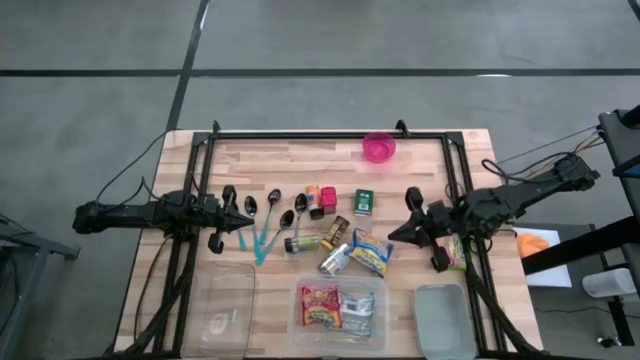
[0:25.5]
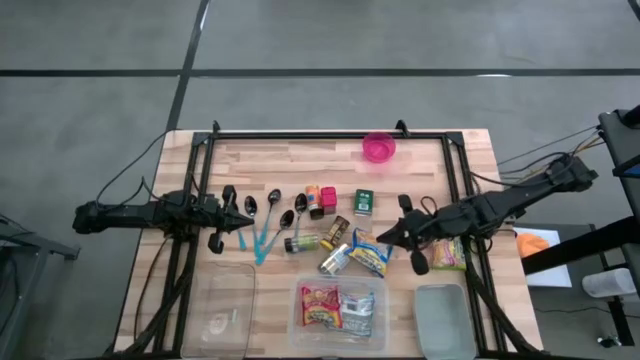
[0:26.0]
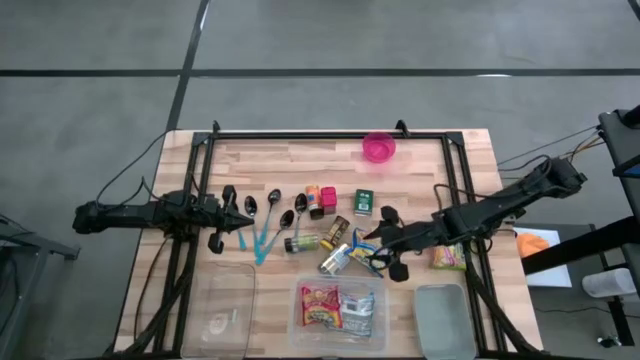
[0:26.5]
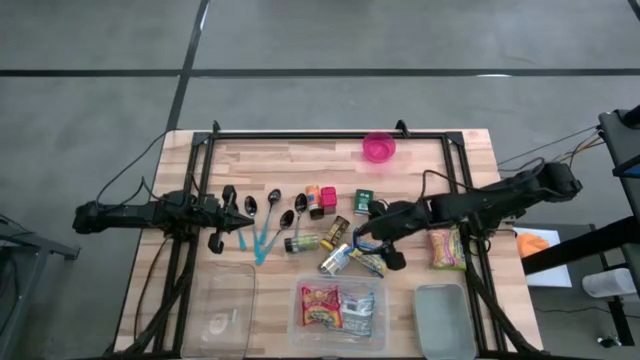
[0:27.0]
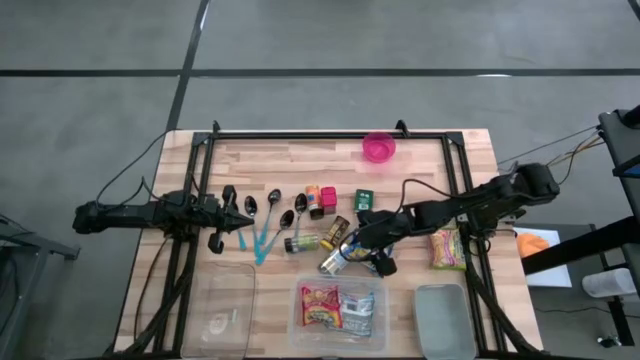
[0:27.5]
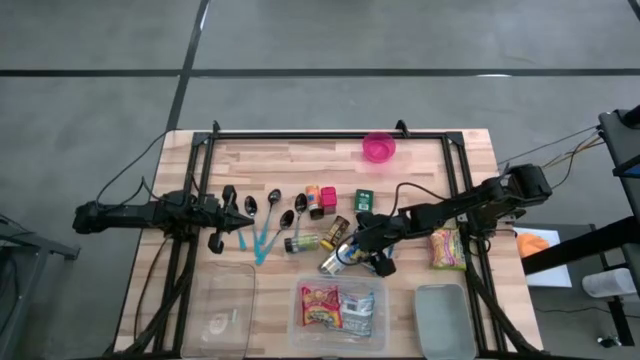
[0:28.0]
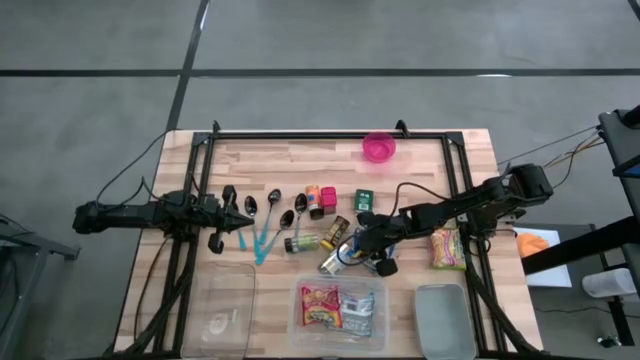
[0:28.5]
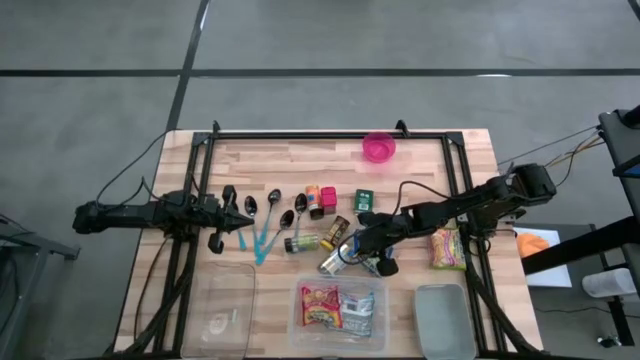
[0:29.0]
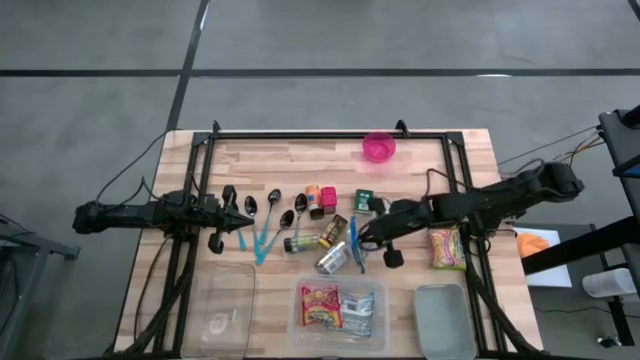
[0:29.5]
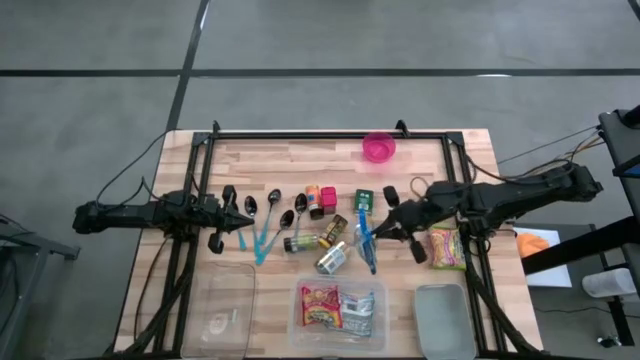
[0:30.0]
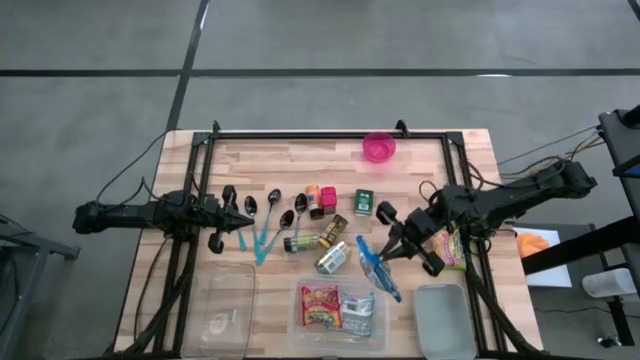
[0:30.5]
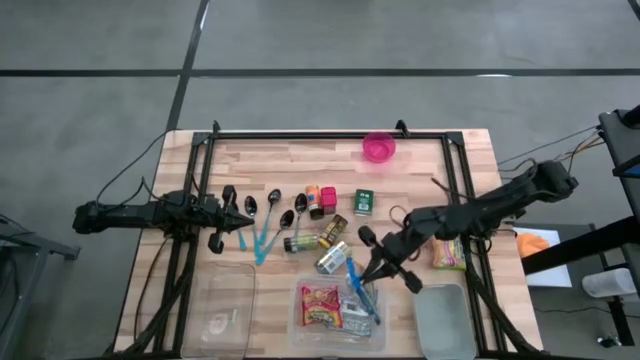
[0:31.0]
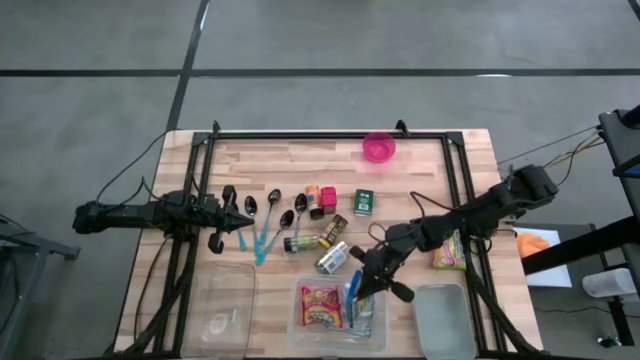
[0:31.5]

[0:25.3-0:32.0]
Put the blue noodle pack into the white bin

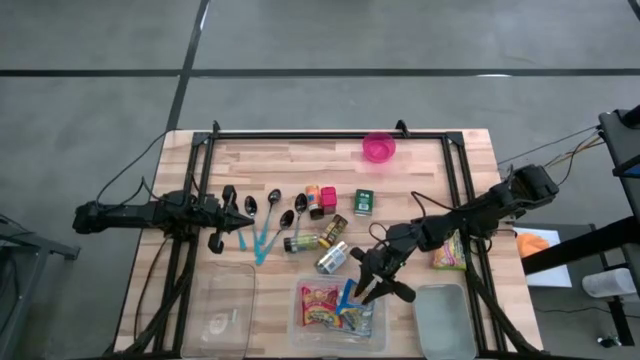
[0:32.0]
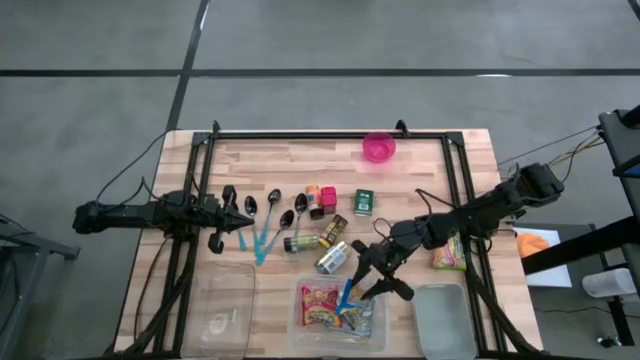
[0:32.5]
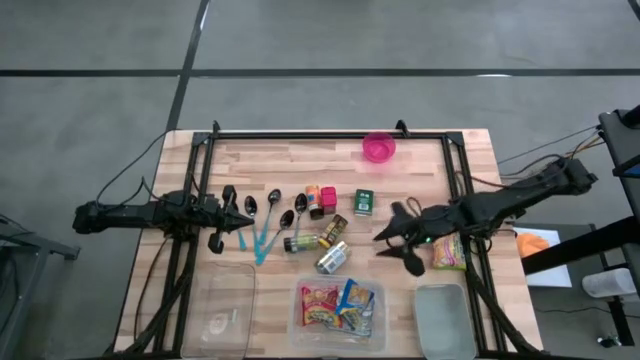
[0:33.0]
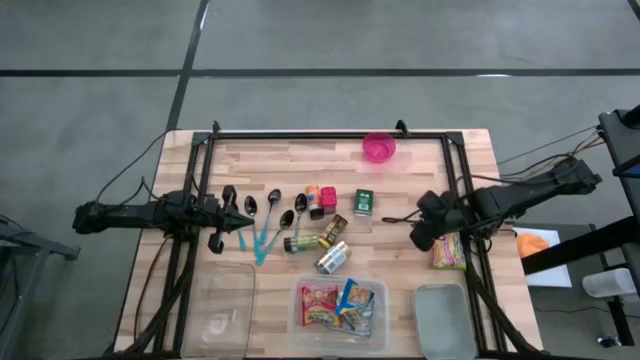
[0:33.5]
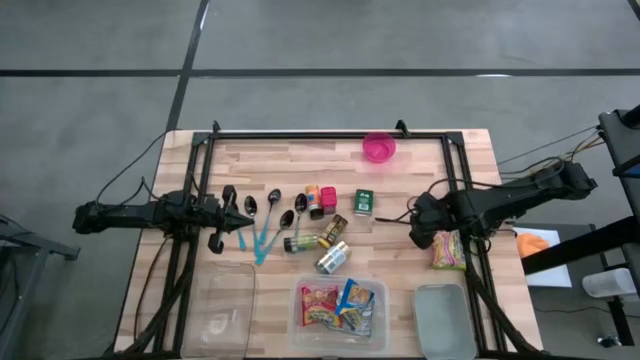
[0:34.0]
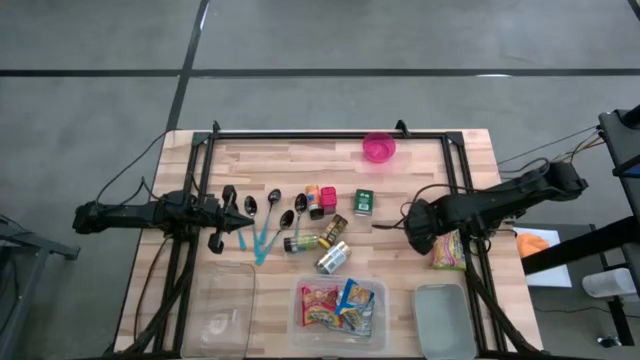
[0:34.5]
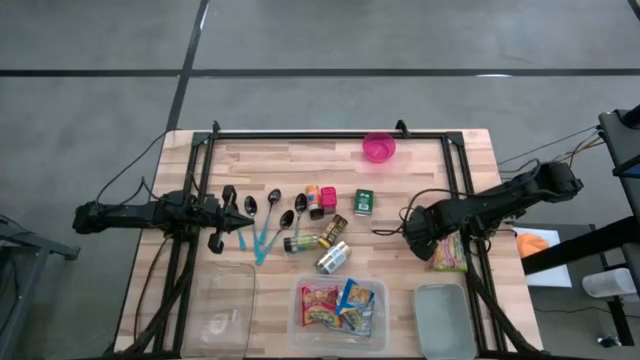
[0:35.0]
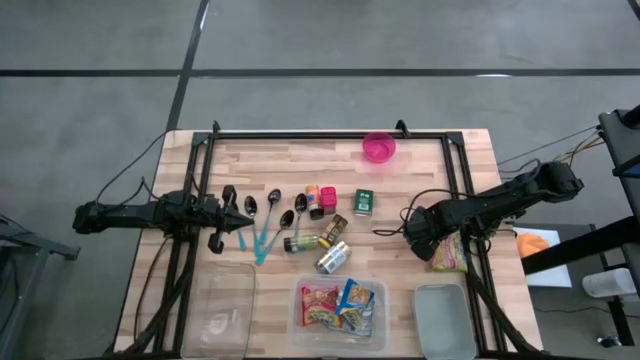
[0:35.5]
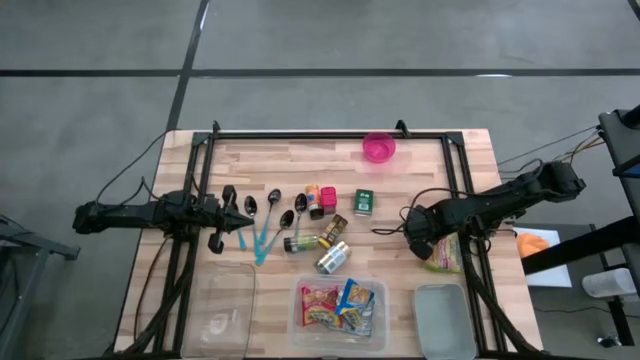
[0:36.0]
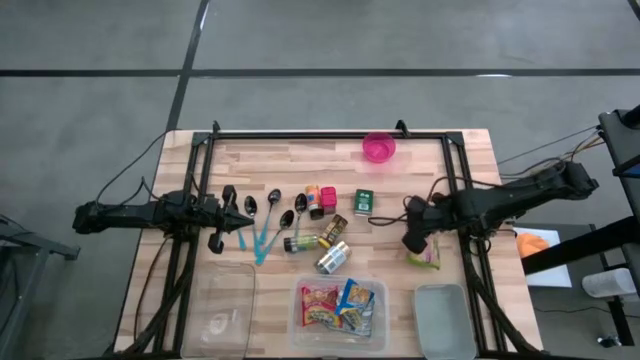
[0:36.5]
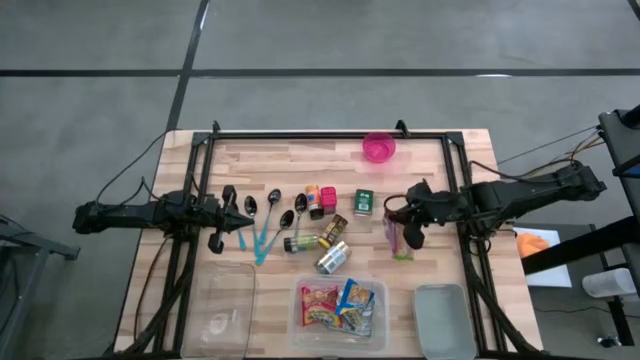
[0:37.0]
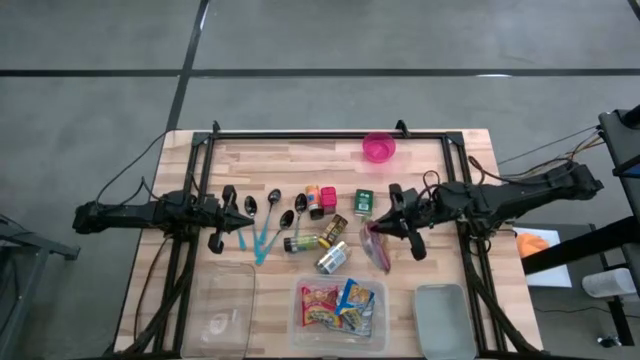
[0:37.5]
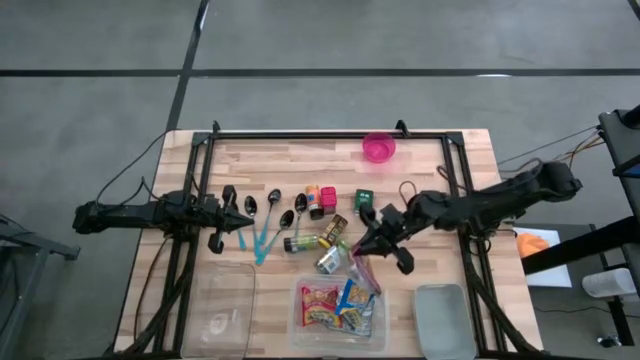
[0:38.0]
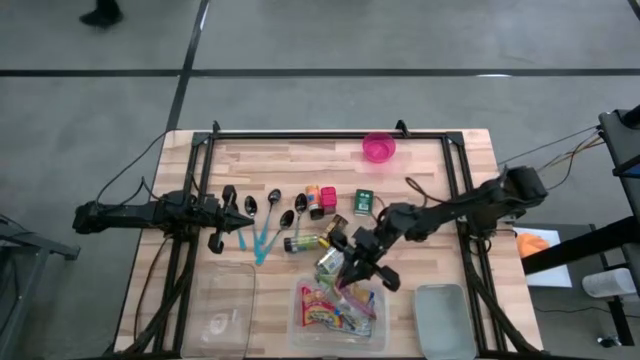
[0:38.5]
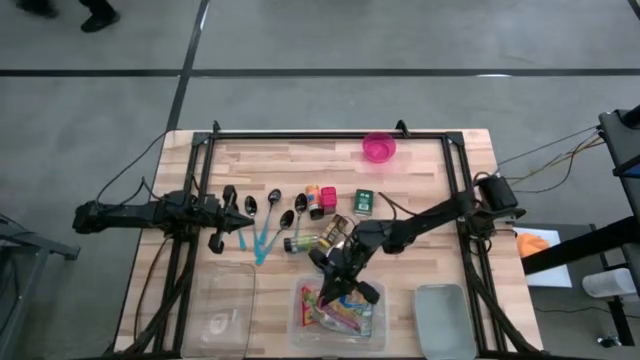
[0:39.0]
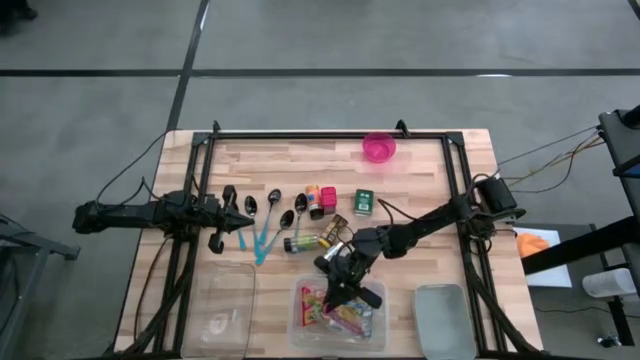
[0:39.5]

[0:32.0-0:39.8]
Put the green noodle pack into the white bin

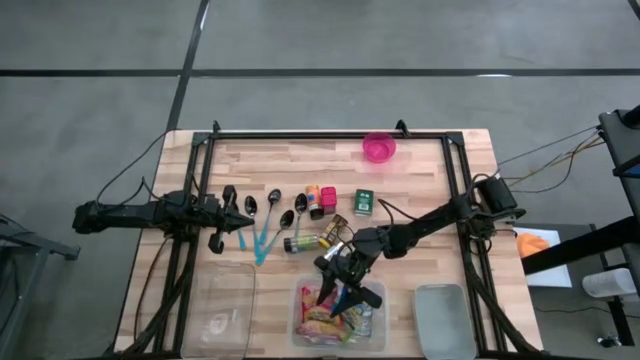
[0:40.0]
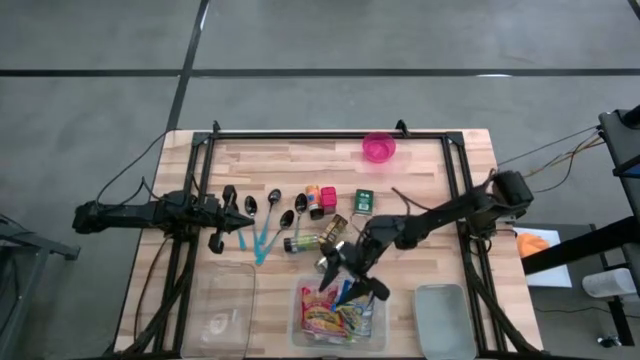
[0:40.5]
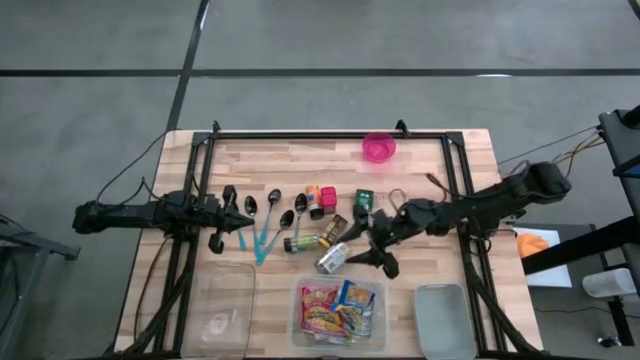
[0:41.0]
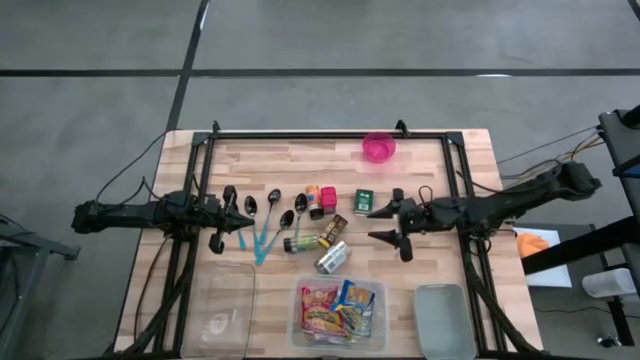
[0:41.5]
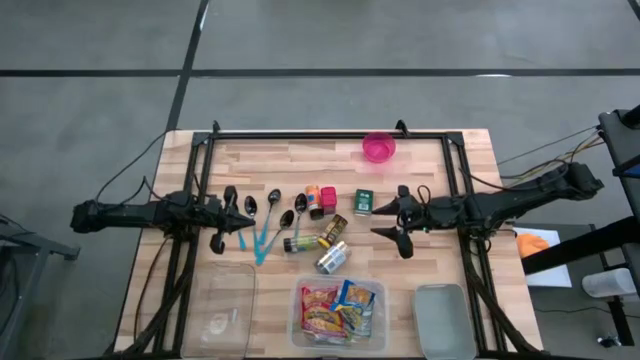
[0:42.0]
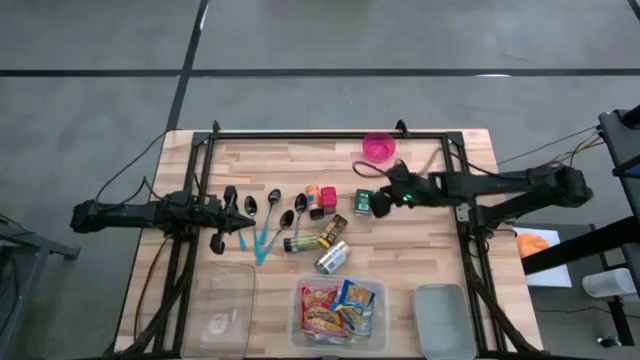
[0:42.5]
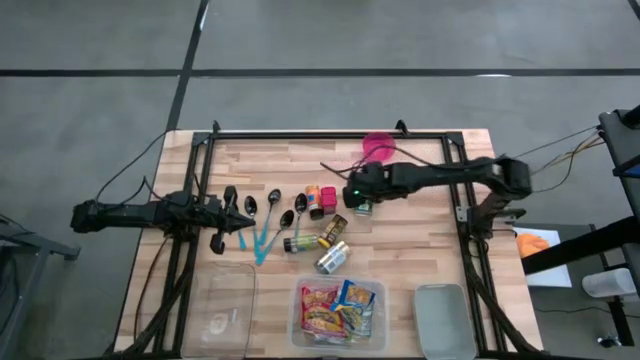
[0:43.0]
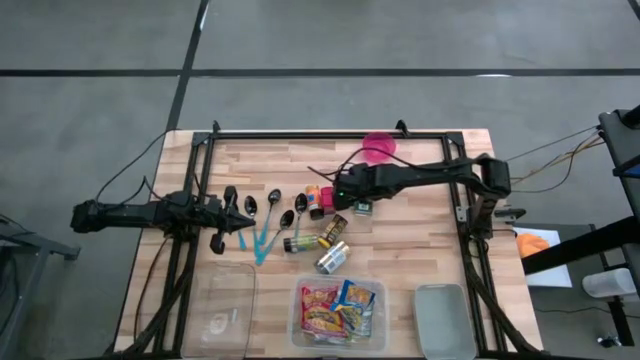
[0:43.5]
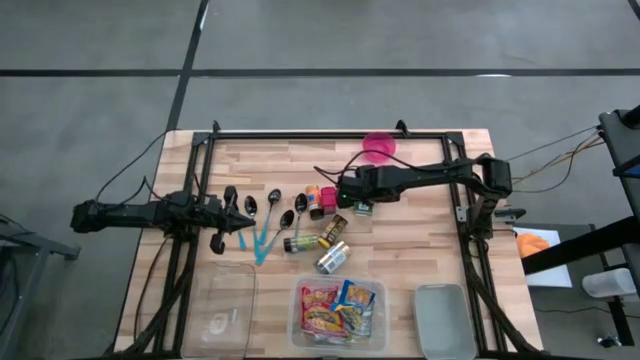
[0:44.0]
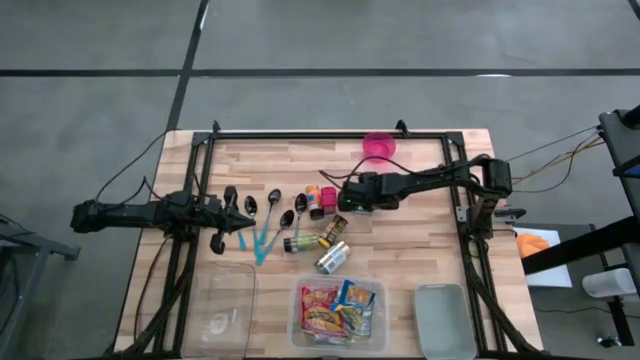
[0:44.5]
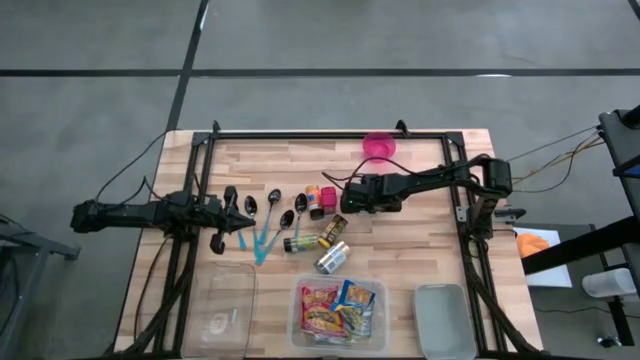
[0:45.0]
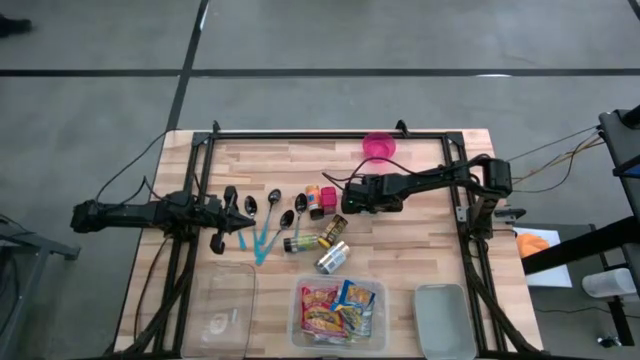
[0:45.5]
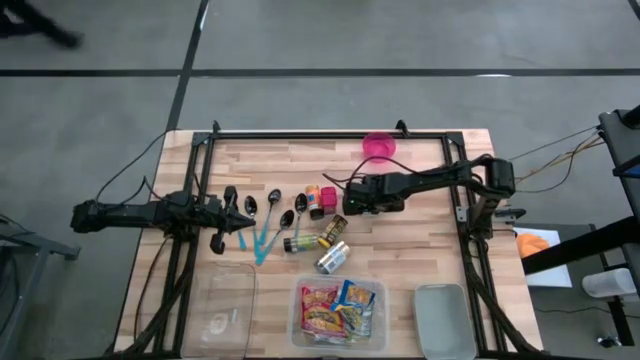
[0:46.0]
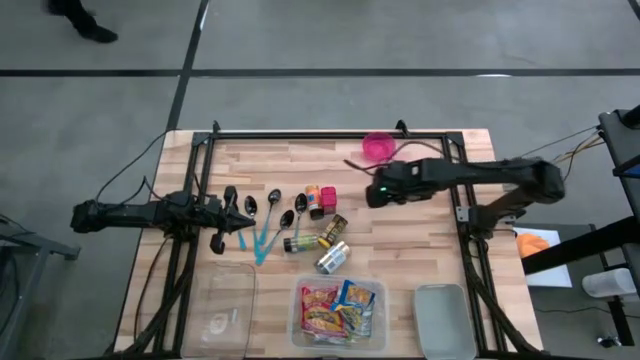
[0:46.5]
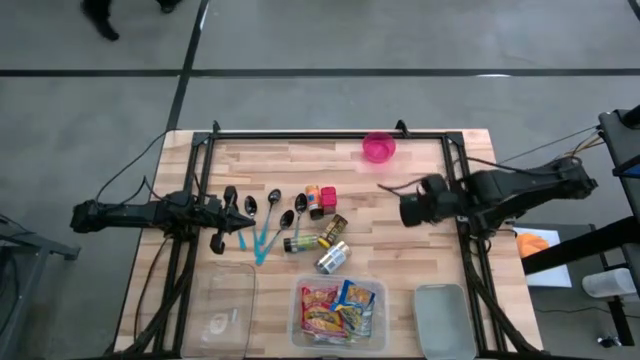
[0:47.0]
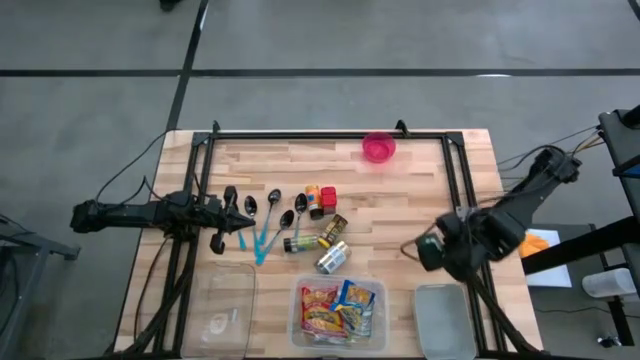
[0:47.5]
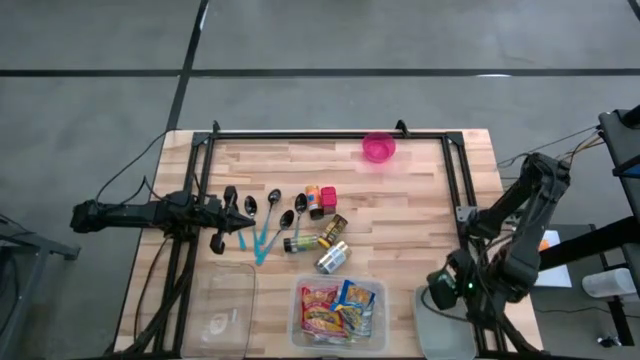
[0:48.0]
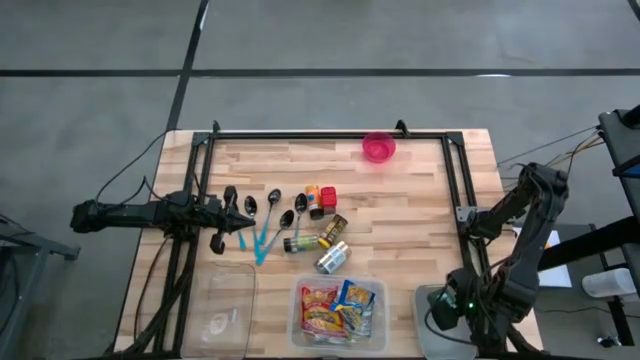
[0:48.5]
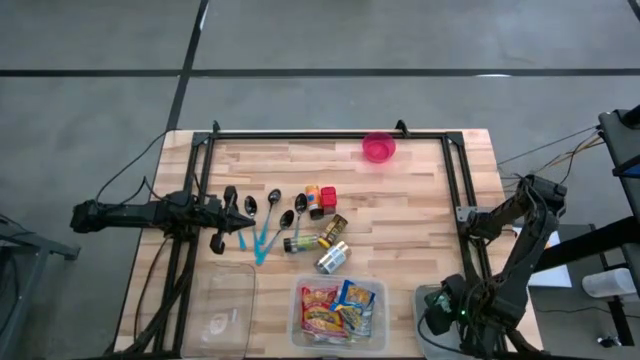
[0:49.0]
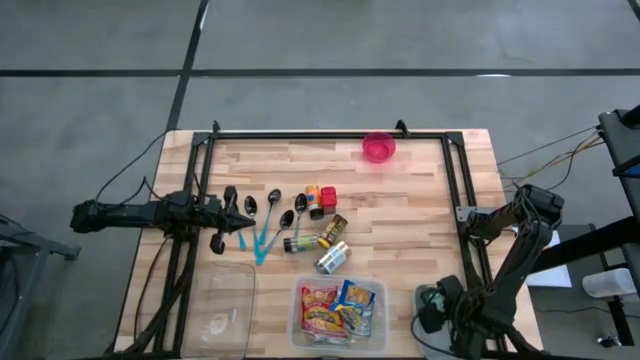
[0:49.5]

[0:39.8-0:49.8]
Put the black seasoning can into the gray bin
